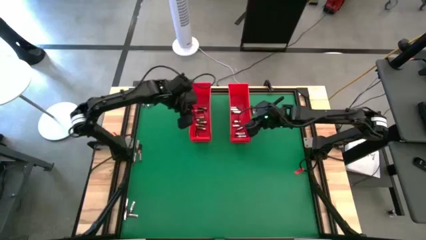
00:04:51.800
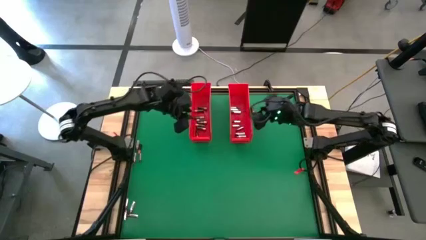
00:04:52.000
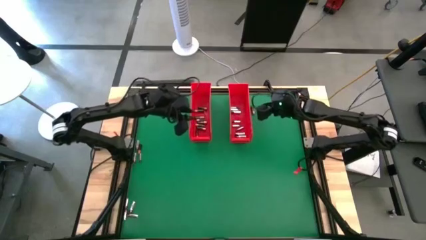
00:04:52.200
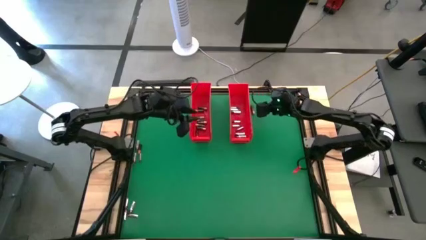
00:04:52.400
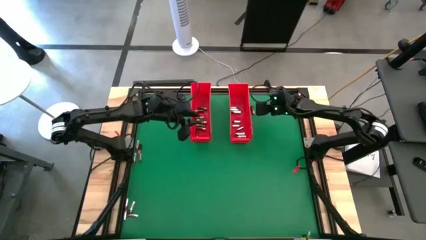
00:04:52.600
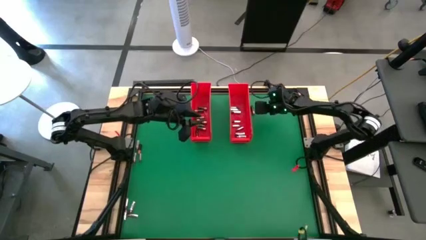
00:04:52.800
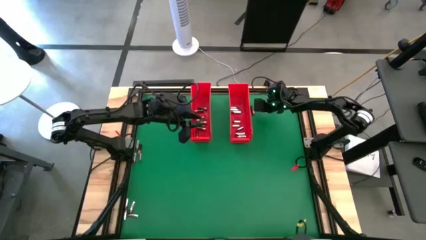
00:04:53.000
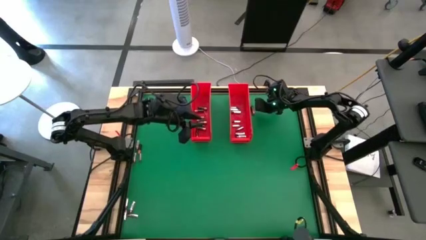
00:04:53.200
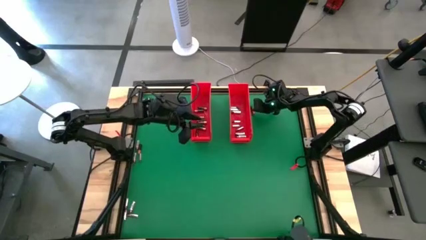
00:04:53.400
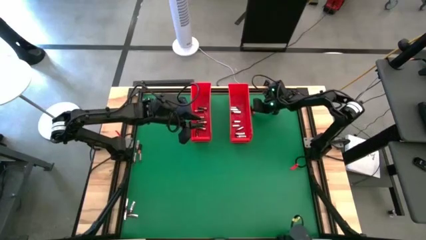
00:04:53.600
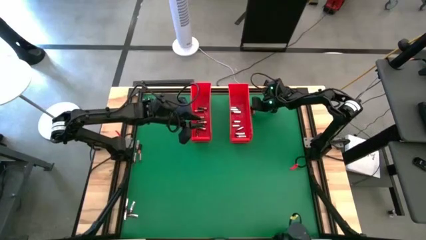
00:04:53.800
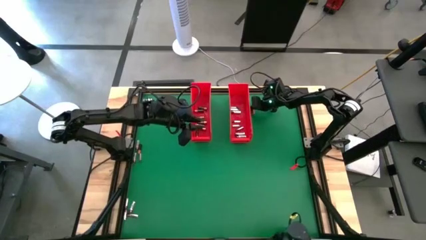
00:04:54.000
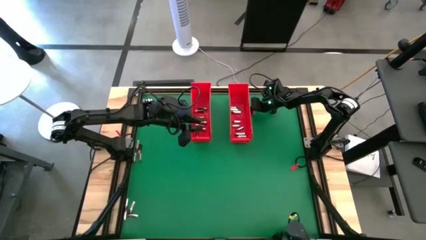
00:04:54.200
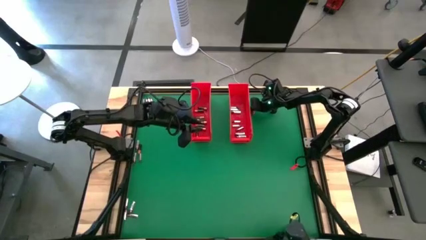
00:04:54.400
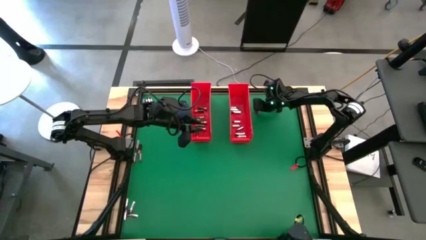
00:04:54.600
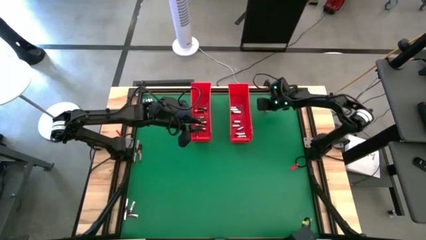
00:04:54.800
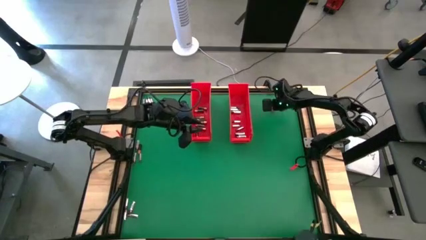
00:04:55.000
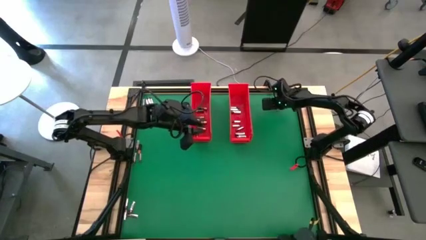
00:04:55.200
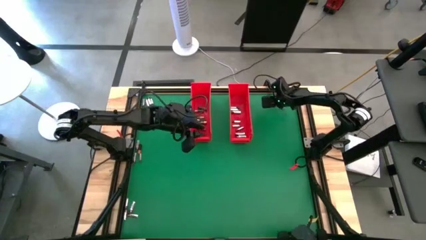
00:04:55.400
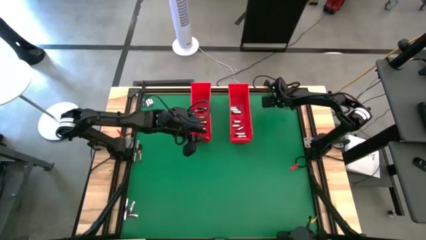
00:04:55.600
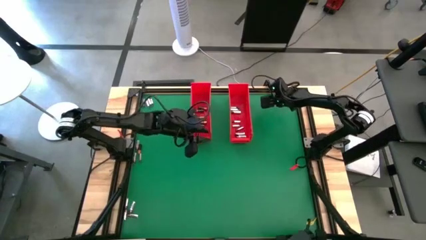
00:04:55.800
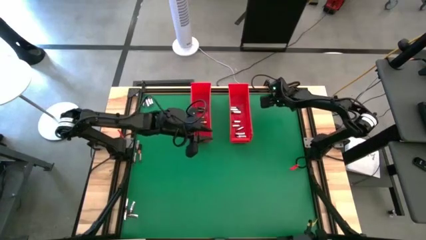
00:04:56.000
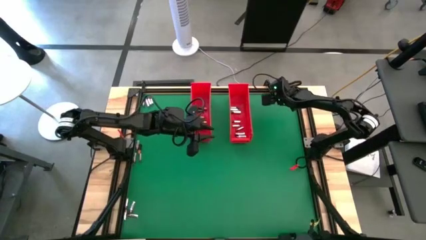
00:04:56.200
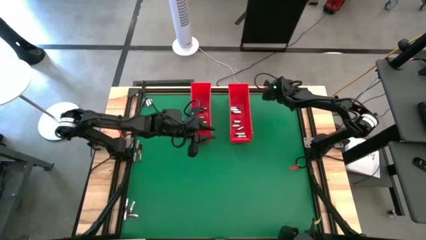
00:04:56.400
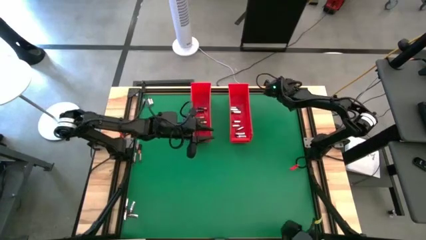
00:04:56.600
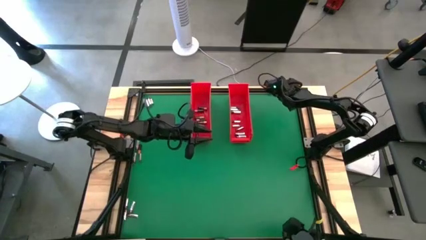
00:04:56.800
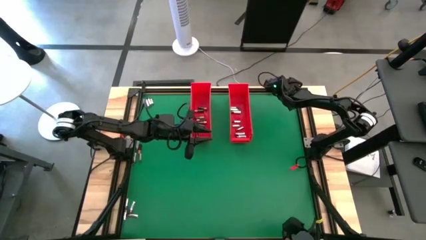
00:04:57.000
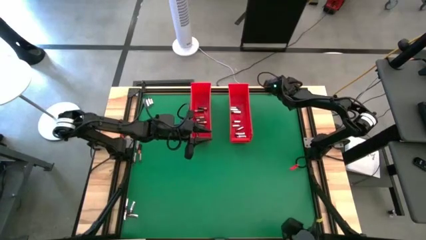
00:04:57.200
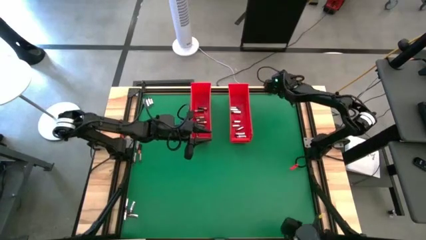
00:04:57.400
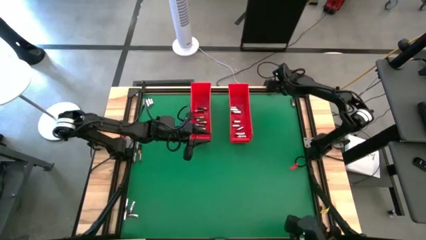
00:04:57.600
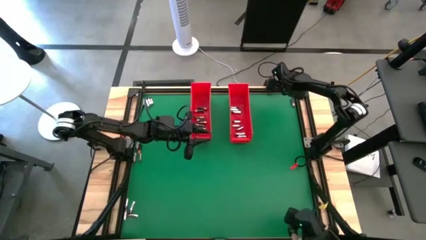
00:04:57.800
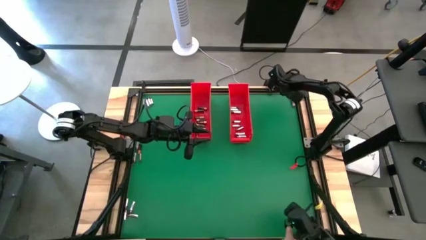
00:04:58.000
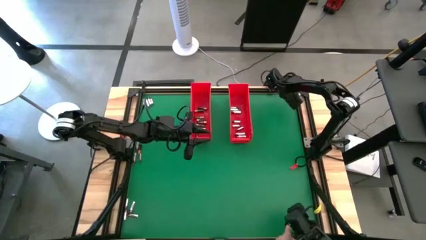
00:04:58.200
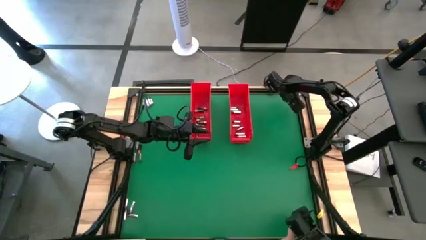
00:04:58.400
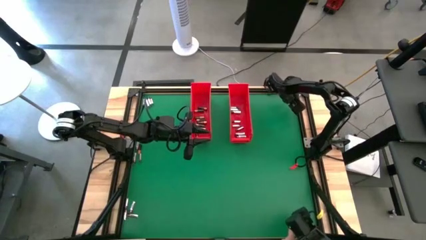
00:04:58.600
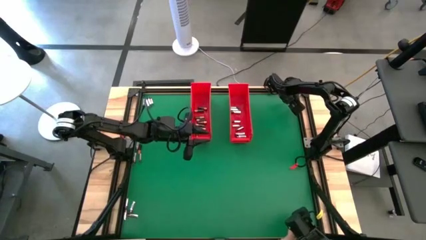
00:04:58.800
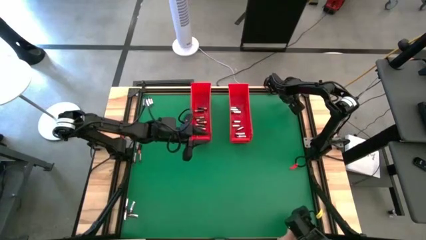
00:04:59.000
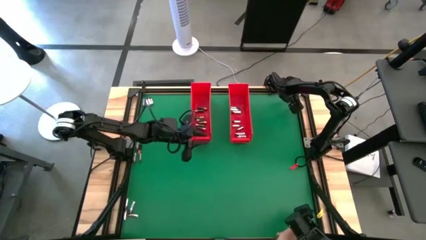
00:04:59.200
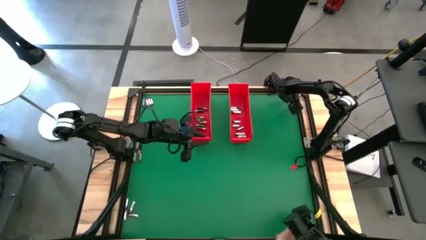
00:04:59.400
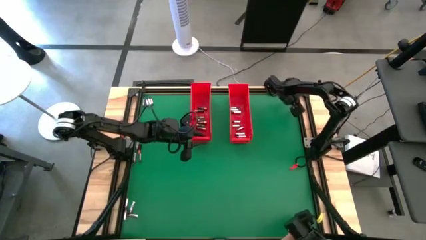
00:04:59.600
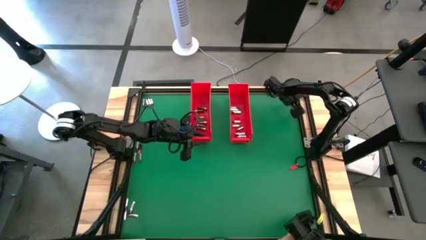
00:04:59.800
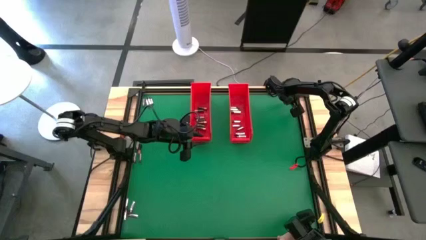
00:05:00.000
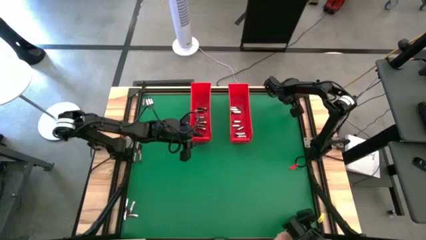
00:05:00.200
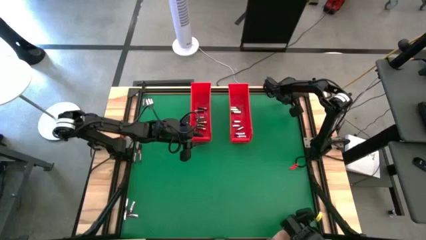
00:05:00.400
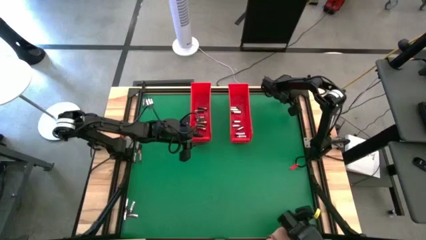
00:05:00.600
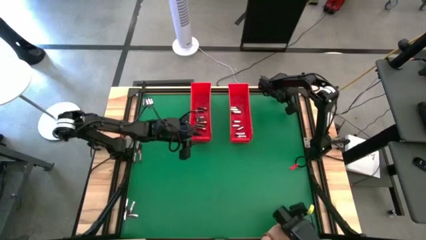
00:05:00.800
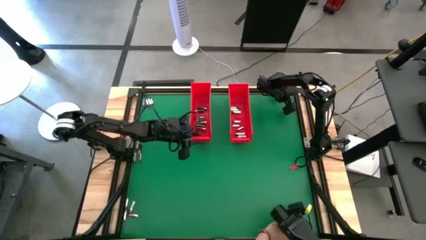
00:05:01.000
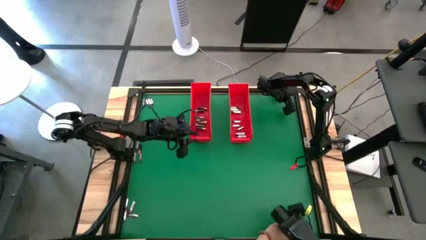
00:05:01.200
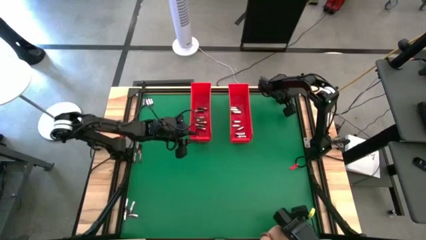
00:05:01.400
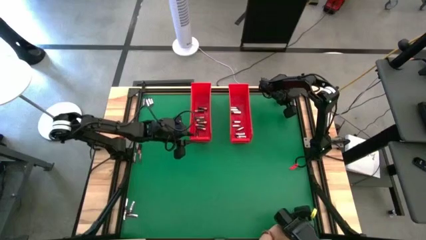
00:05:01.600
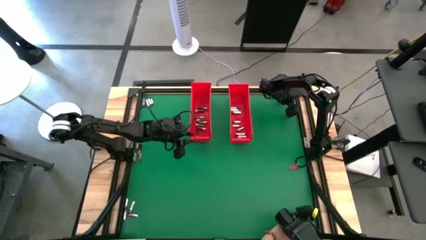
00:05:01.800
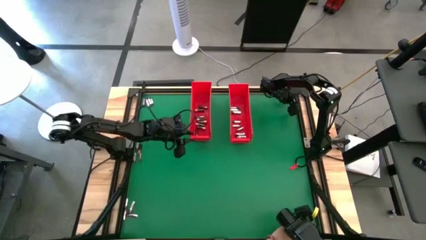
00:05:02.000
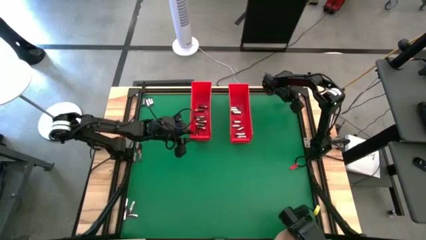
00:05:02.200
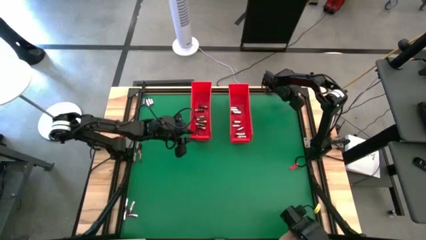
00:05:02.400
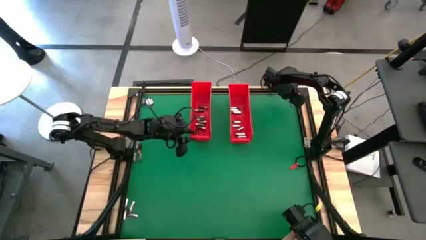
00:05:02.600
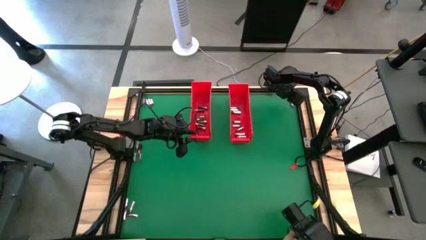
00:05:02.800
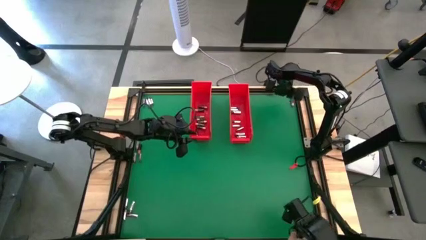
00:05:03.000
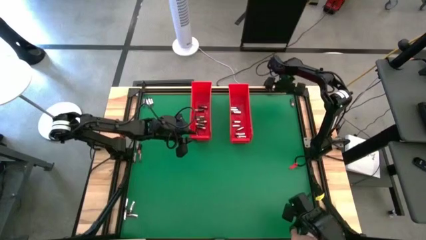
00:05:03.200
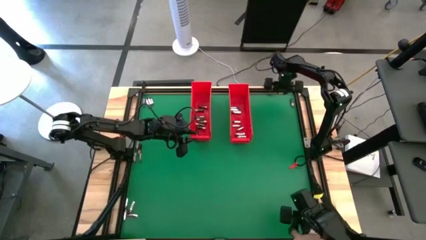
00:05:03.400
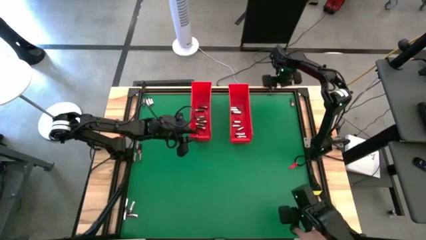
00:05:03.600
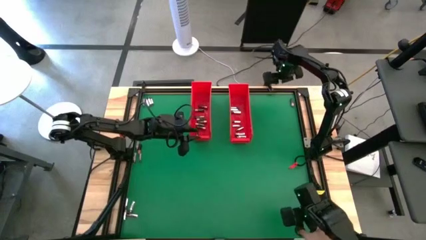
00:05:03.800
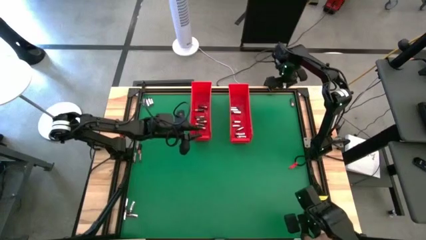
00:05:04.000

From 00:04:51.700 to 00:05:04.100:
Task: Sort batteries
Put the brown battery into the left red bin

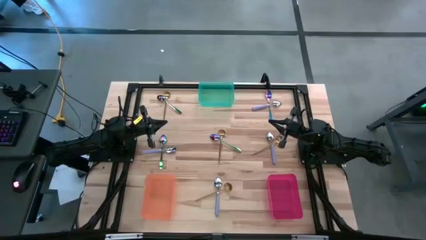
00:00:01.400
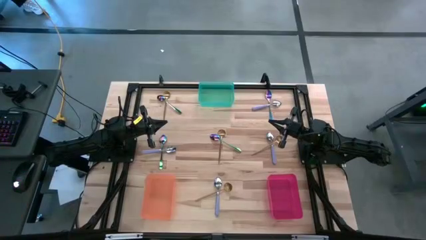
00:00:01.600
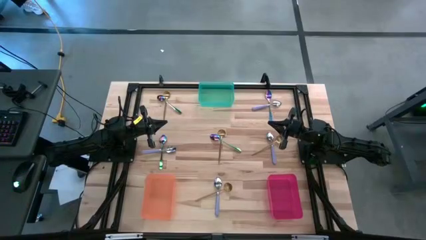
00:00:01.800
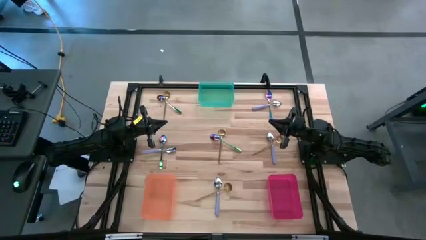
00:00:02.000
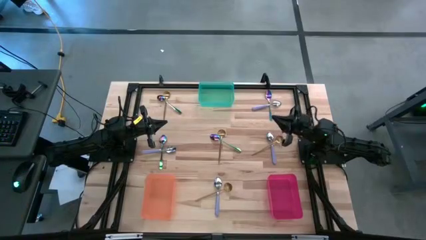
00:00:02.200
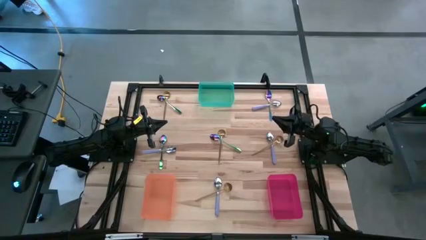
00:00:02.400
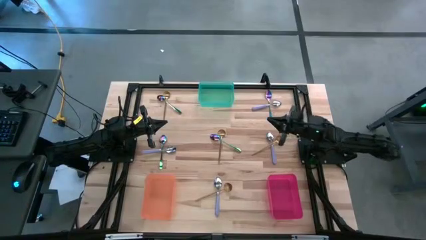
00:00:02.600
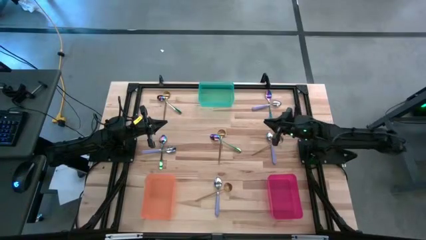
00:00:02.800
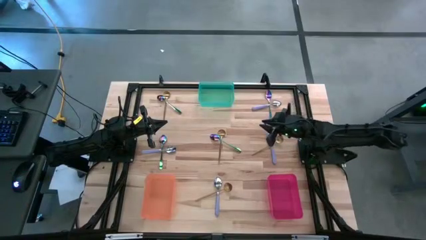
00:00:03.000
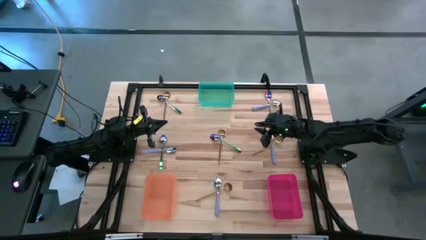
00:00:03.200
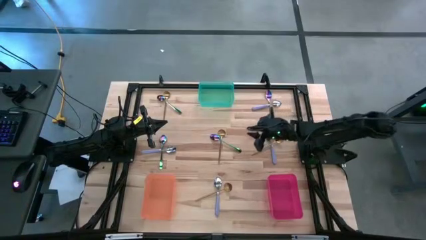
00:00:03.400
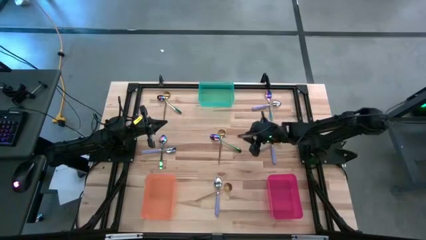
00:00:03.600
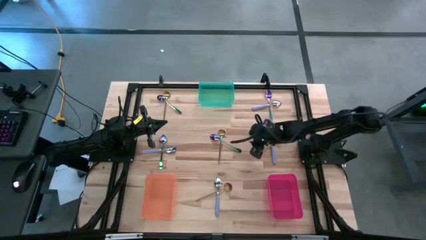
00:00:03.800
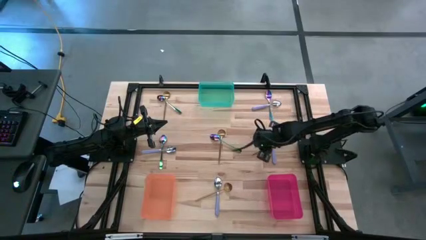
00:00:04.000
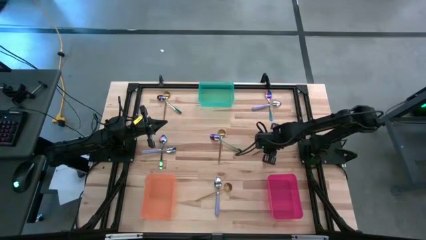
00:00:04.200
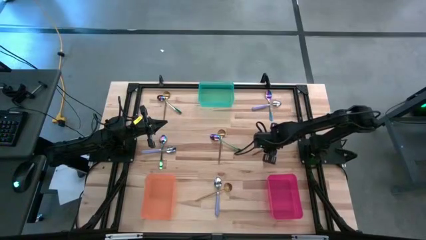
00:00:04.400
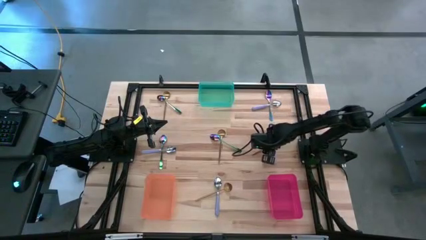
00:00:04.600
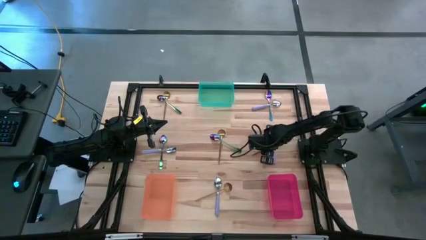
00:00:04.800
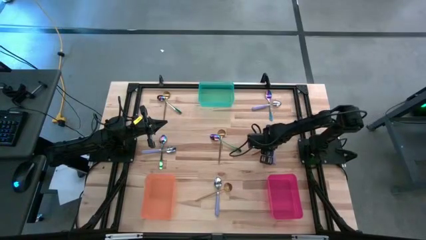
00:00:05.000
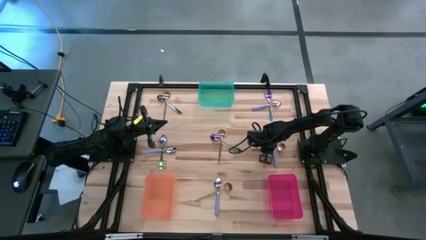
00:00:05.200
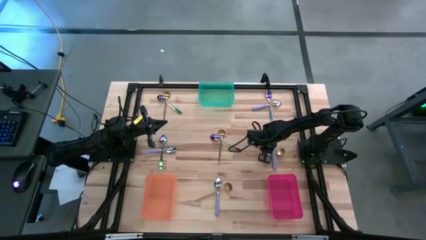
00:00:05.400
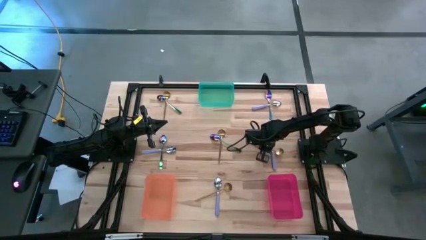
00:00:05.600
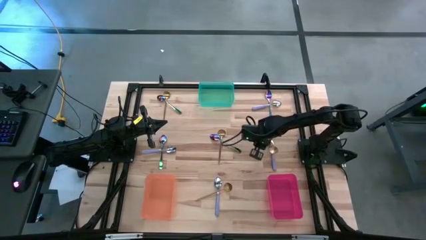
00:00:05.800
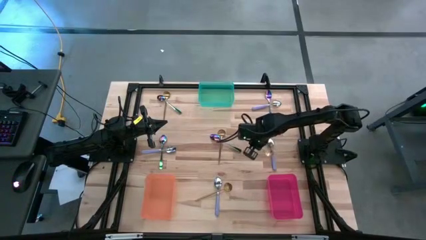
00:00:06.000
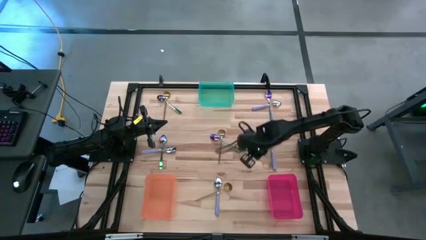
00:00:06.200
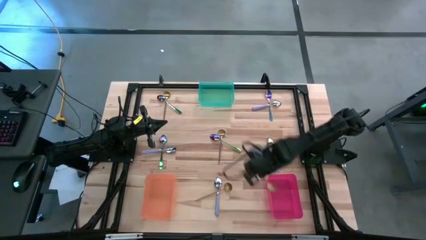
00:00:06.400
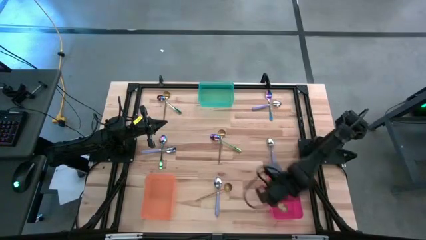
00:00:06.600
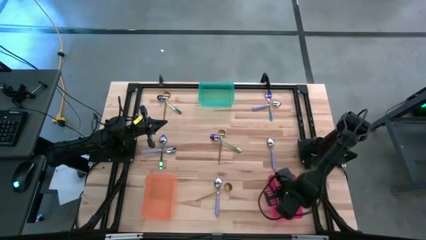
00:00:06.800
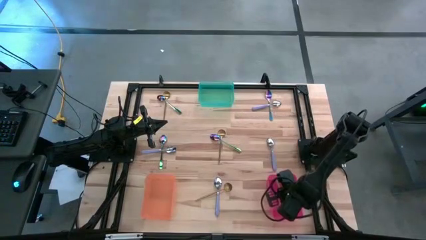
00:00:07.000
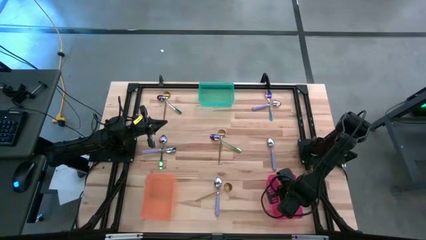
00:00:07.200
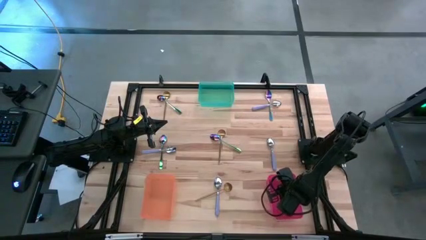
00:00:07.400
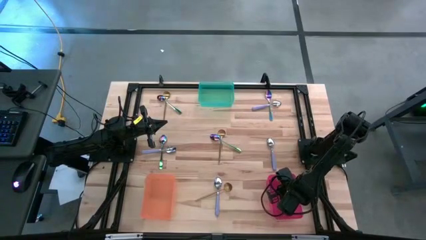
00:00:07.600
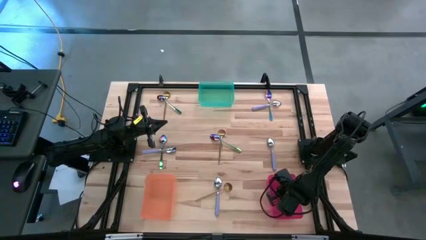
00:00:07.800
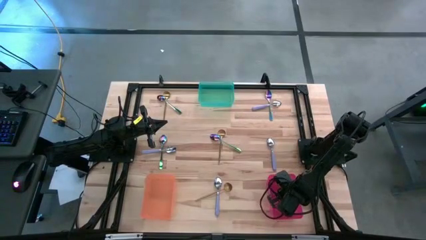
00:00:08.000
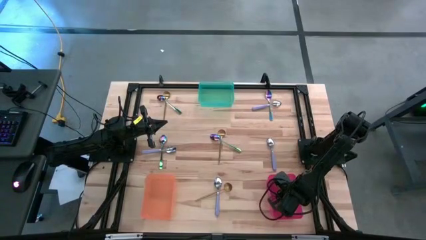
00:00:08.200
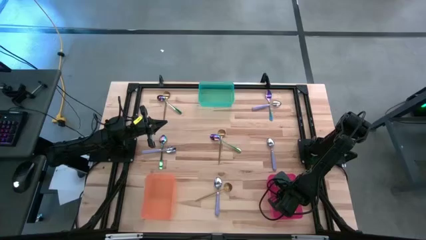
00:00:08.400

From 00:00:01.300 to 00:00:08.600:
Task: Sort silverware by color (type)
Put the gold spoon into the pink bin
